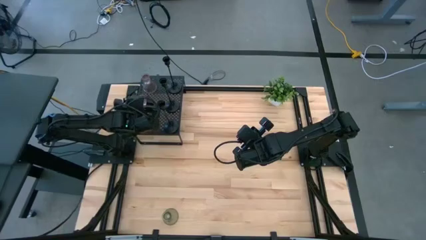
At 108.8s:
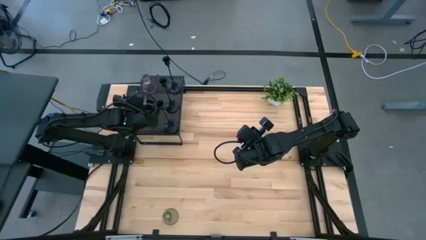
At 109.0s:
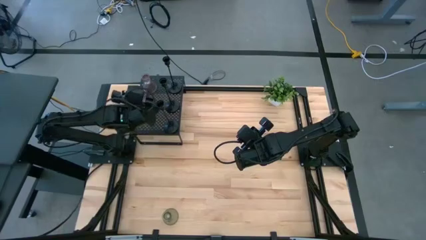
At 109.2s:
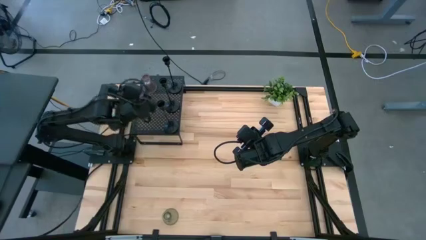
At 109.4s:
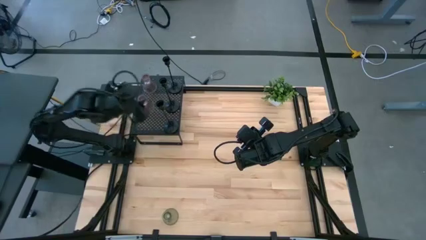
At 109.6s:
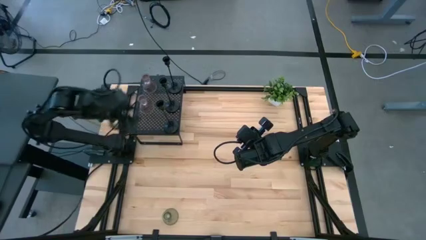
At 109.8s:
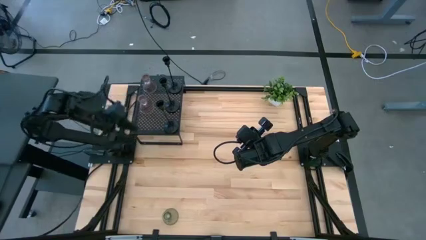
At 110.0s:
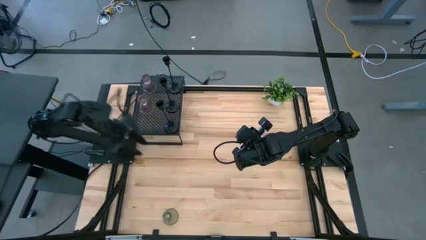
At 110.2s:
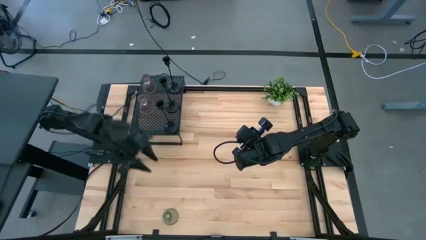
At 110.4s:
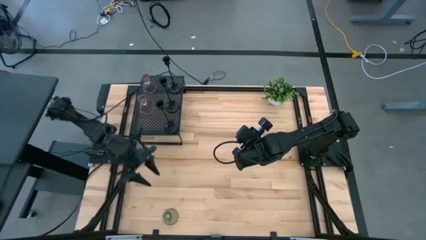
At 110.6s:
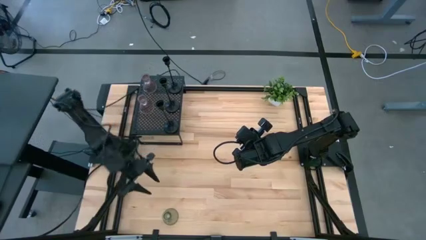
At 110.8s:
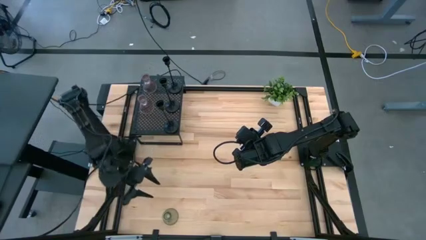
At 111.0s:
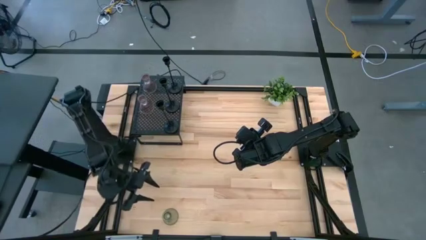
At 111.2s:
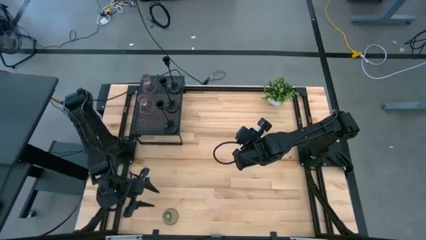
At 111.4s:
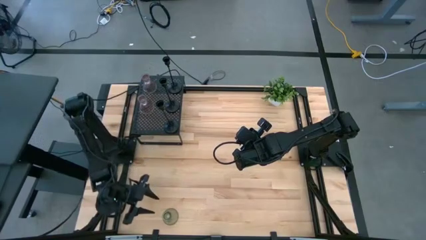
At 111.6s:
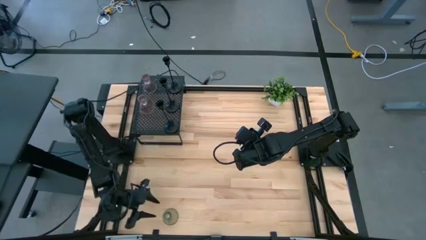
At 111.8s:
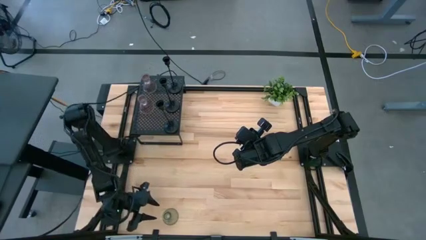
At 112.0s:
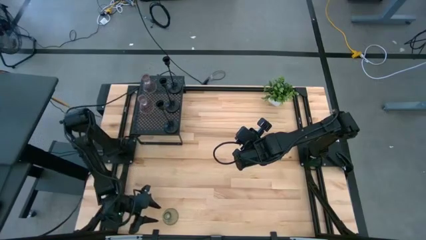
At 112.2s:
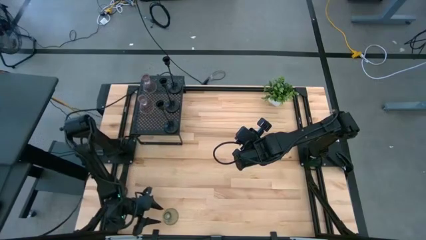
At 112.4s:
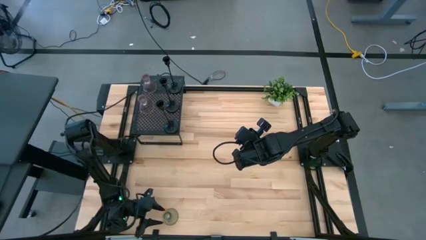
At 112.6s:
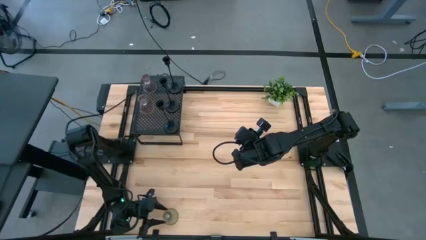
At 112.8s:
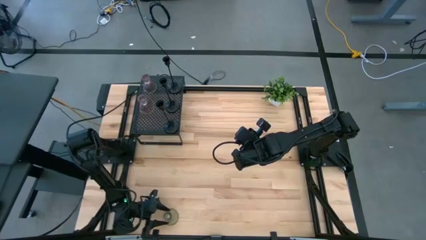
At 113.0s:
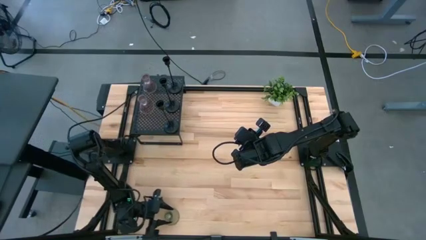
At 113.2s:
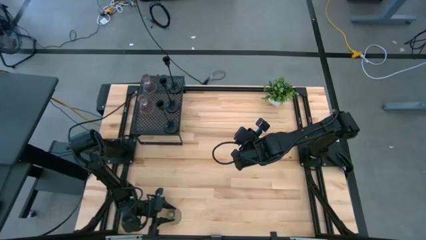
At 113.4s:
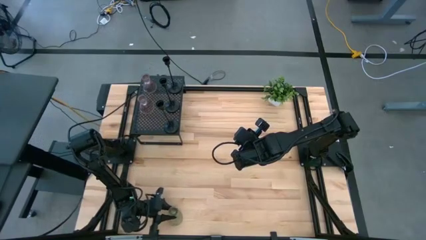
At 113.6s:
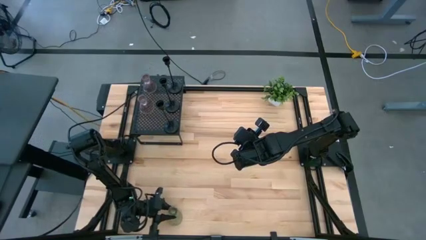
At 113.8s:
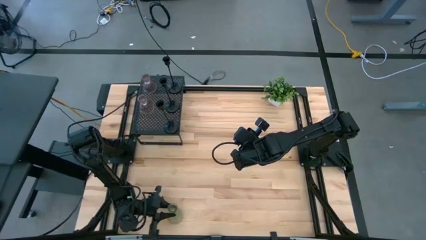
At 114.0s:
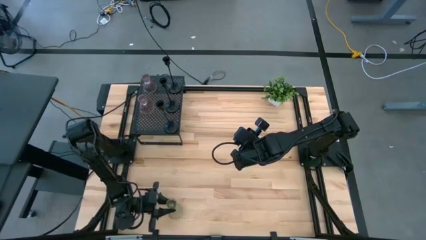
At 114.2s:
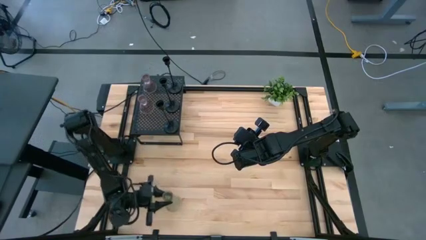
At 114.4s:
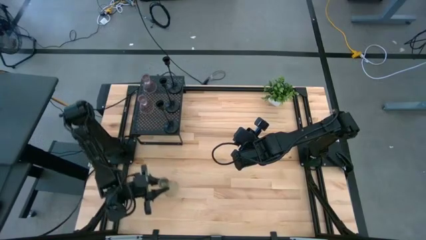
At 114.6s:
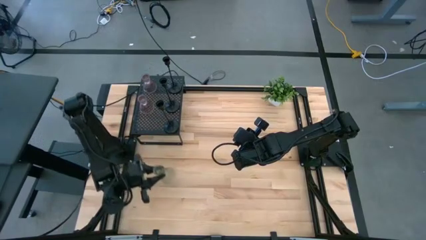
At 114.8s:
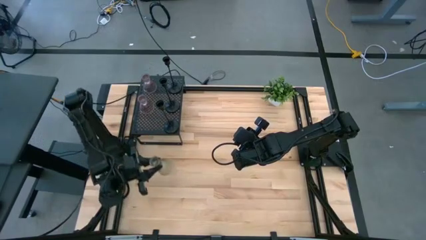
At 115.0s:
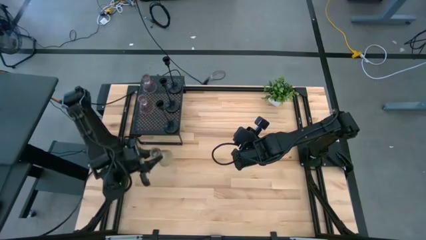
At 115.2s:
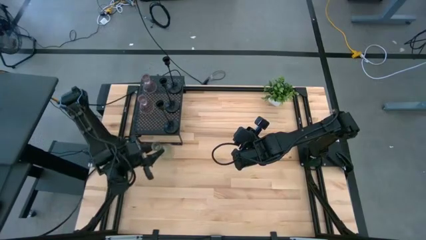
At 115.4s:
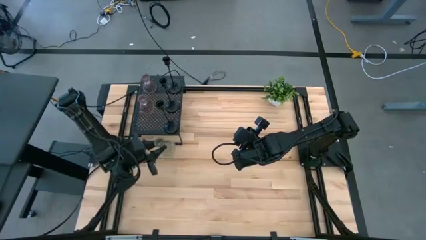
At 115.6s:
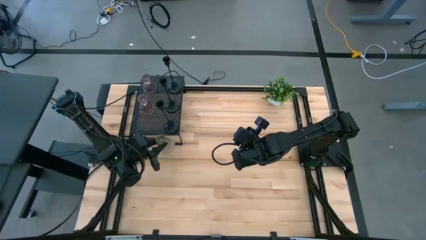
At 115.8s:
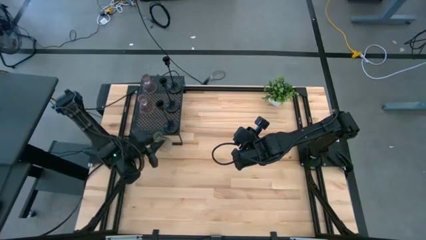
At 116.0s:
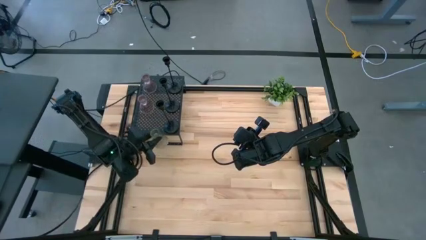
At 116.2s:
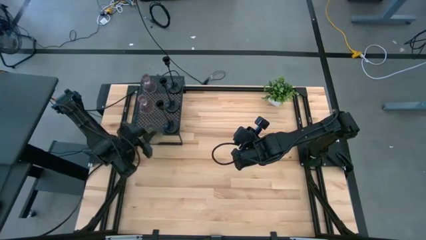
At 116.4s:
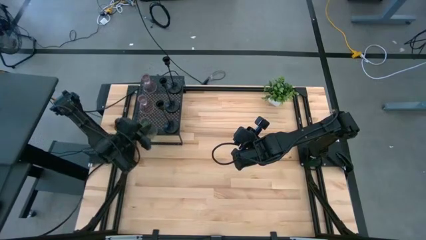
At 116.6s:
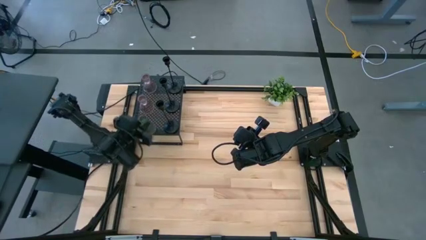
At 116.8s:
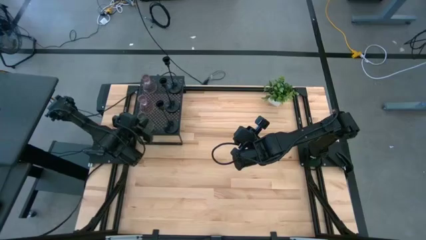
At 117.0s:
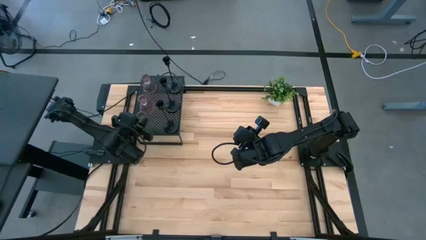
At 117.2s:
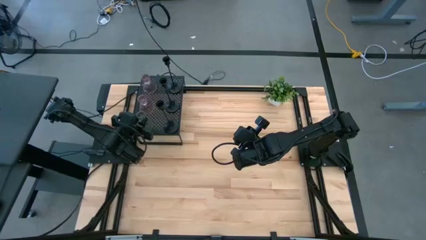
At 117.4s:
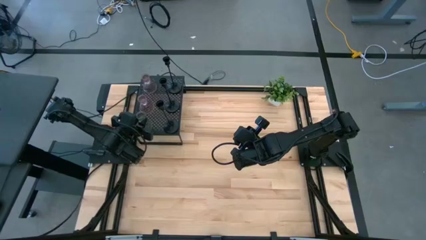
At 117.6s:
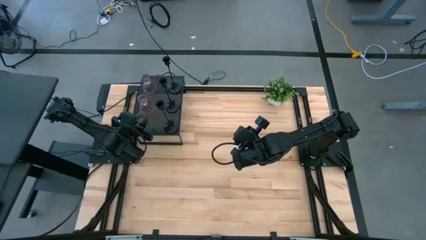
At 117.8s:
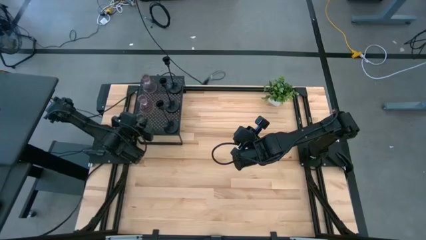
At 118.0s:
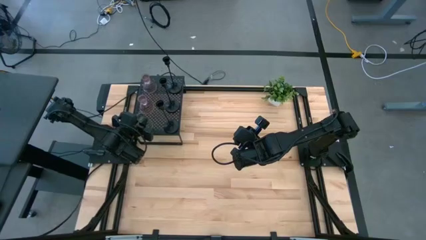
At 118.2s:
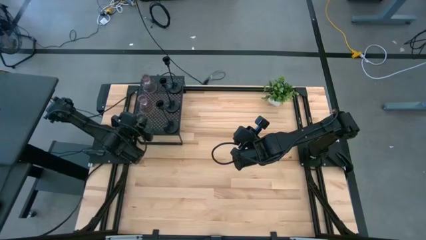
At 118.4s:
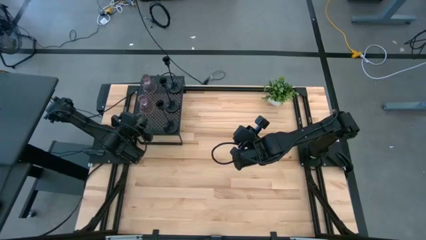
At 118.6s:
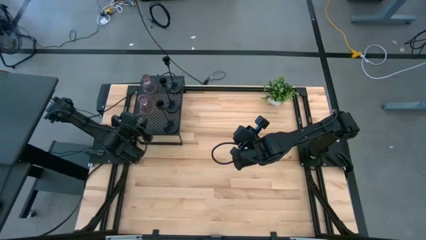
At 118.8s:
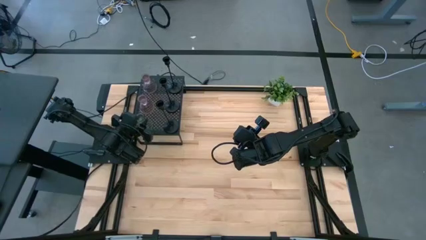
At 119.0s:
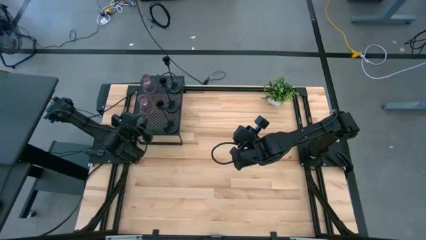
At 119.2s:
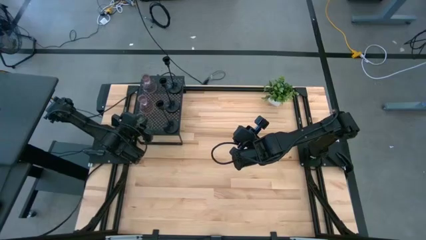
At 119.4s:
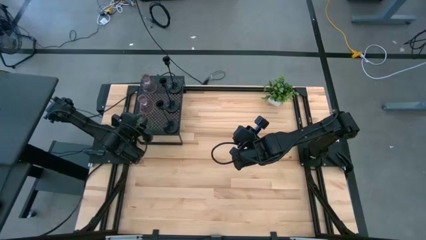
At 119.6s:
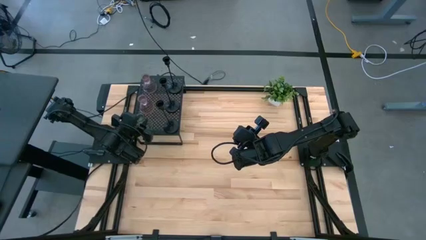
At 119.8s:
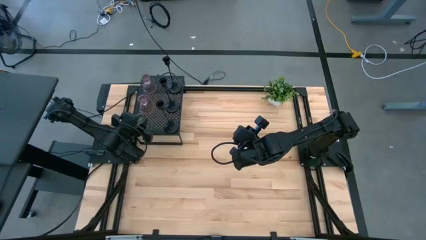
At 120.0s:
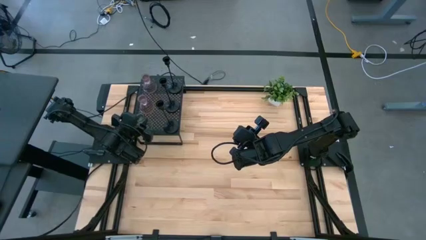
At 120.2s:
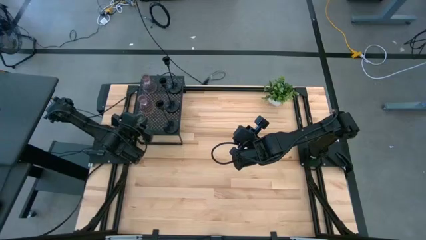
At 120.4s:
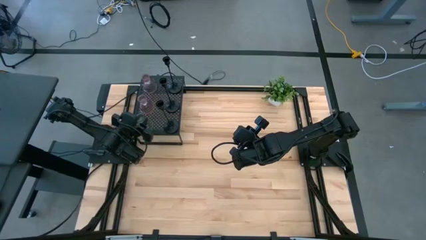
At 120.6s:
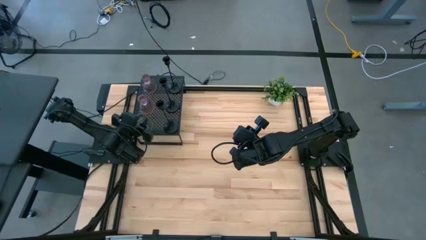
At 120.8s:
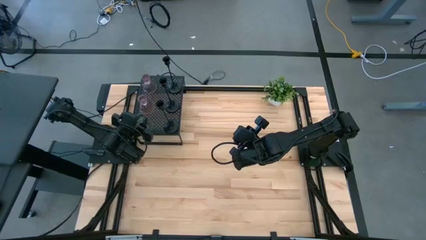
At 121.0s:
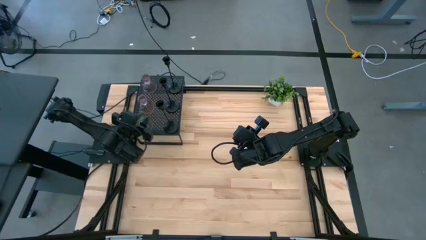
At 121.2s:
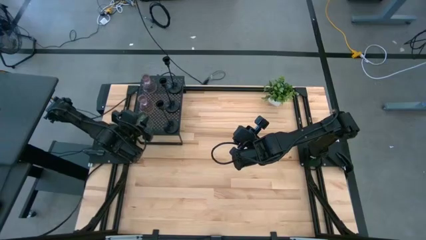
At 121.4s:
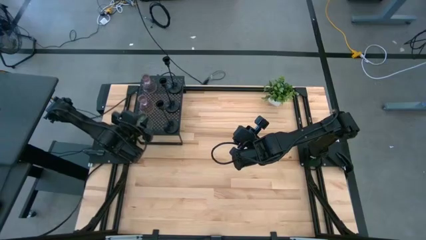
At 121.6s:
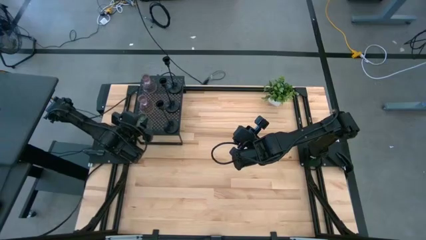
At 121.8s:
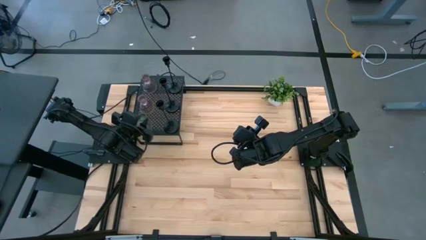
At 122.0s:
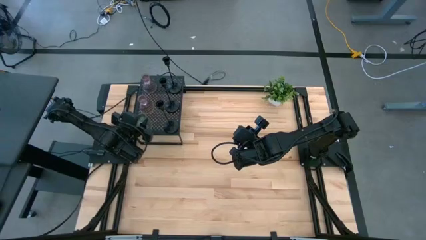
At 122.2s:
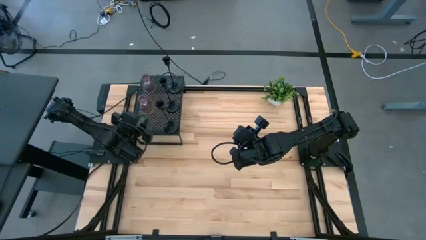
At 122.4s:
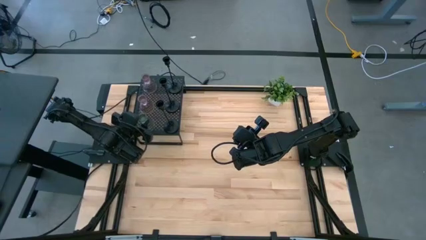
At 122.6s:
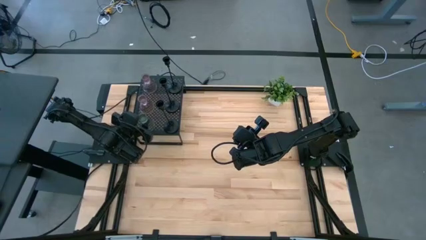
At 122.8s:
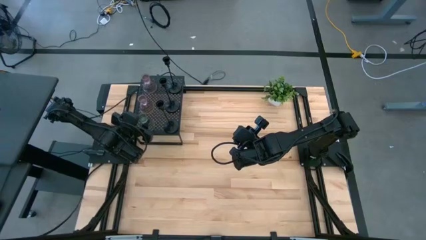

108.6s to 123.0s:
Task: Pick & Place candle stick holders
Align the green candle holder with the other pink candle holder on the shelf

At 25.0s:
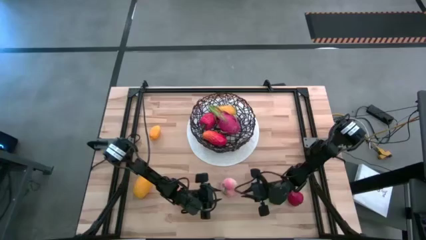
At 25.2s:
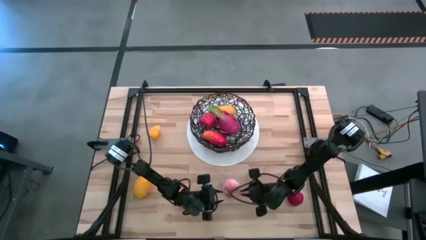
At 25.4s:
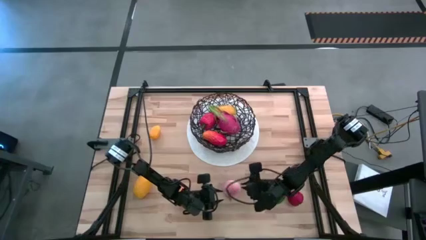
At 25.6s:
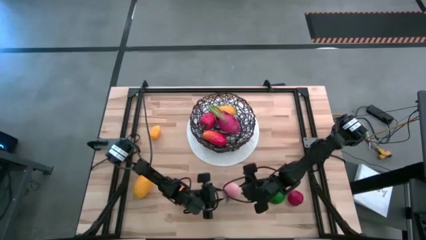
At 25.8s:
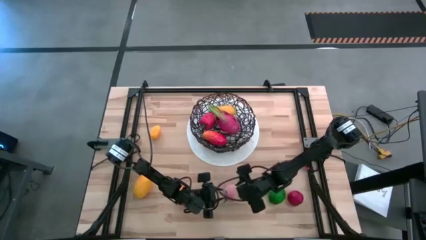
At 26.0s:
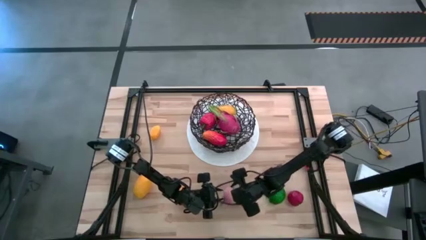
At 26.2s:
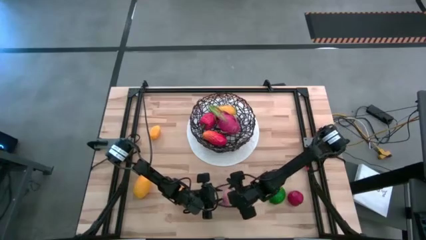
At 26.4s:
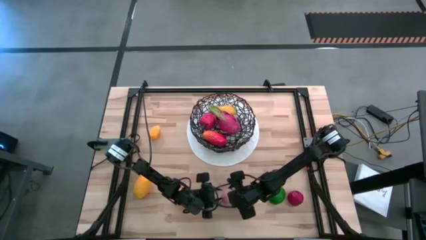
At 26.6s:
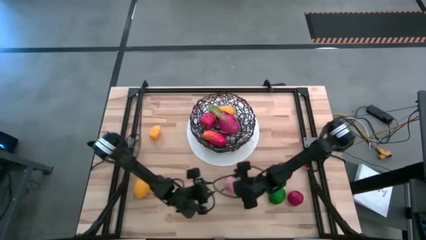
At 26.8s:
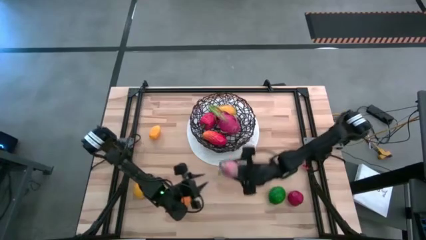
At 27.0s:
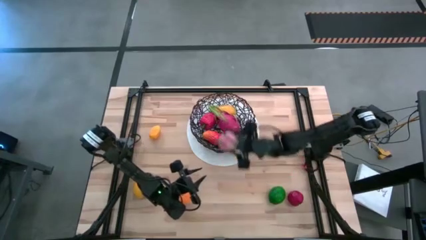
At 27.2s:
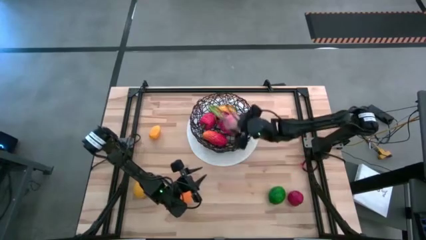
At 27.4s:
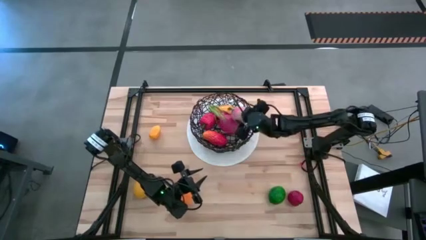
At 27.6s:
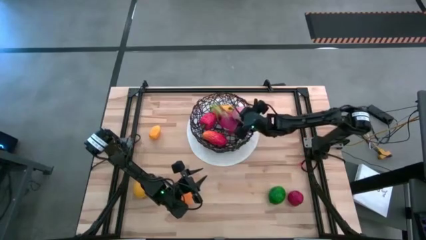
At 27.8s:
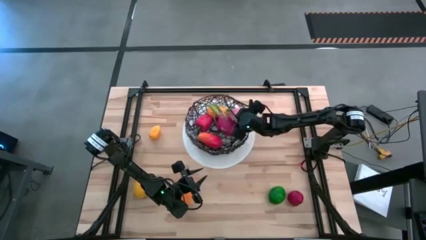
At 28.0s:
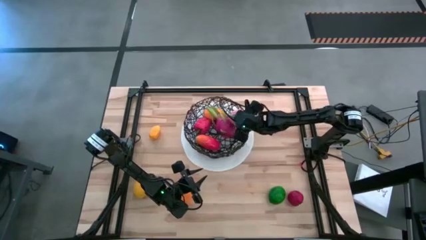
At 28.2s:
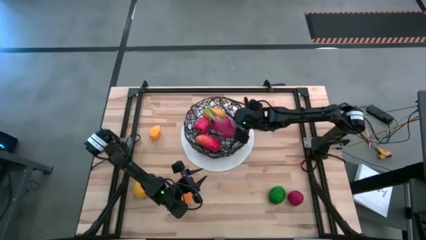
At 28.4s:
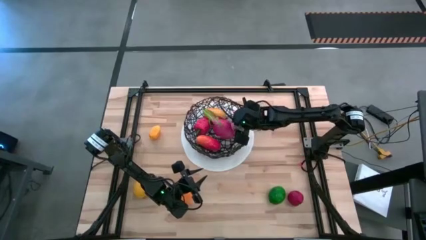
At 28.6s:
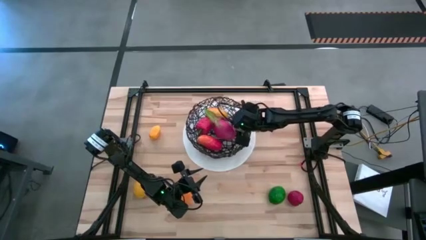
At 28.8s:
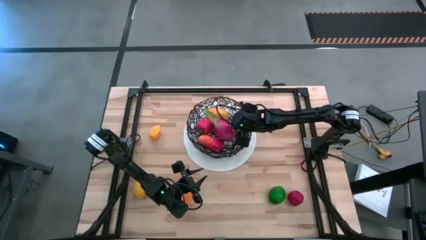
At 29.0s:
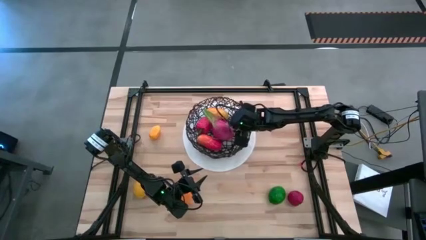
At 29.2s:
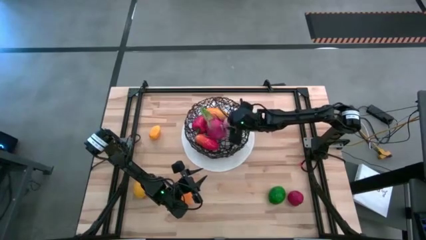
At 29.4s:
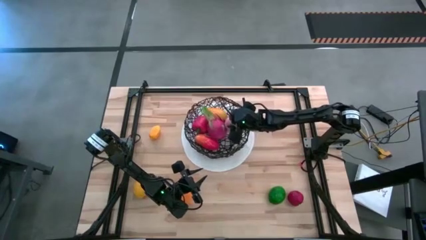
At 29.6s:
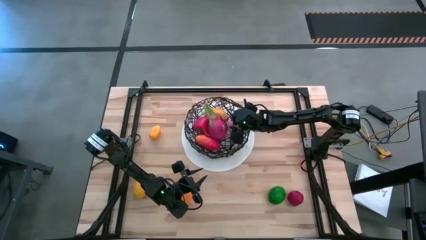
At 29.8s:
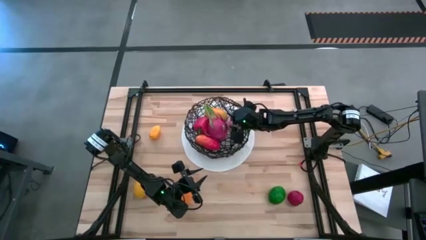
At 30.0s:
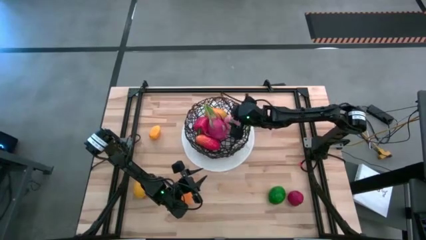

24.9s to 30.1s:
Task: Build produce basket
Put the peach into the wire basket
